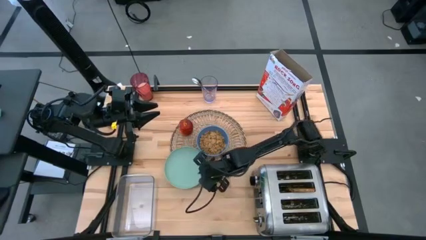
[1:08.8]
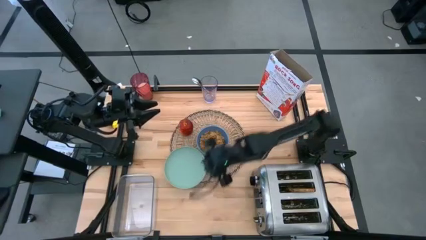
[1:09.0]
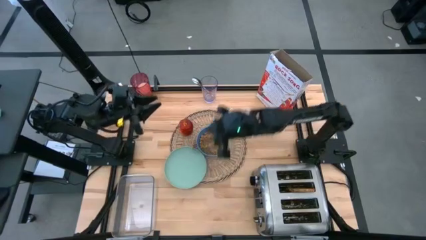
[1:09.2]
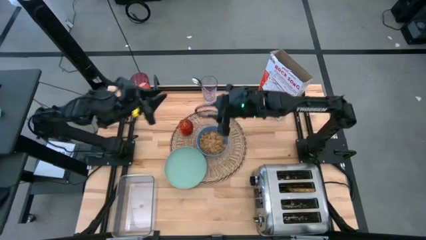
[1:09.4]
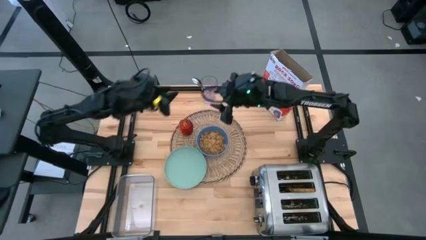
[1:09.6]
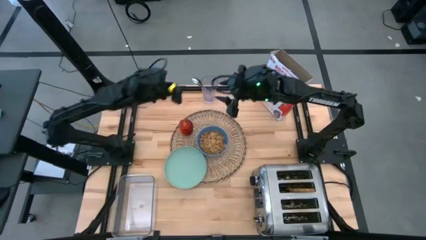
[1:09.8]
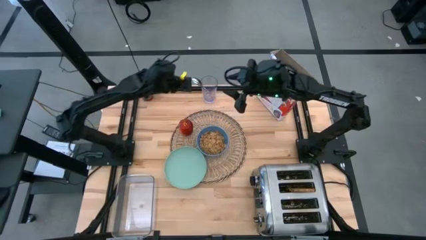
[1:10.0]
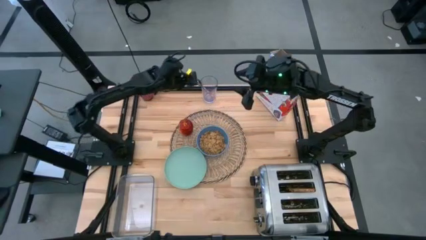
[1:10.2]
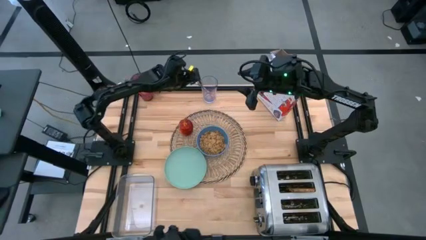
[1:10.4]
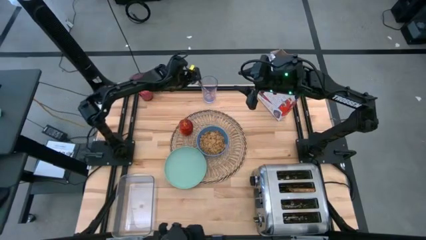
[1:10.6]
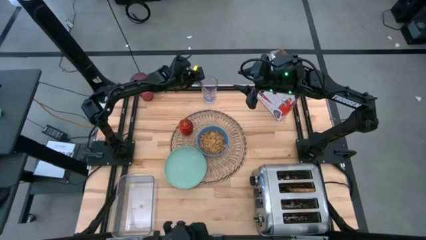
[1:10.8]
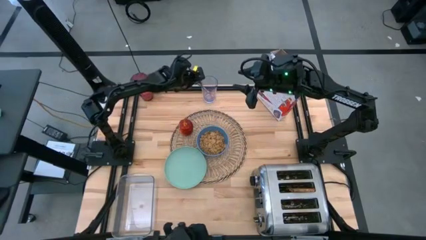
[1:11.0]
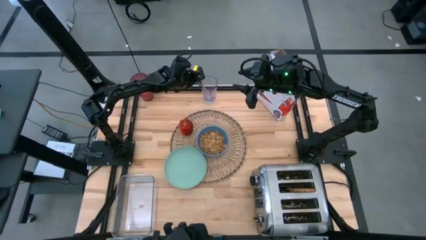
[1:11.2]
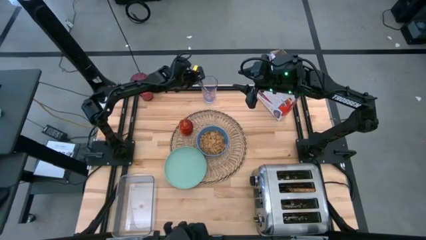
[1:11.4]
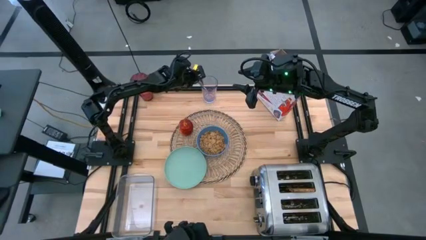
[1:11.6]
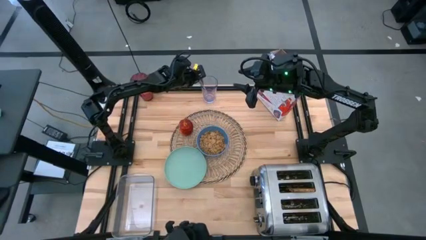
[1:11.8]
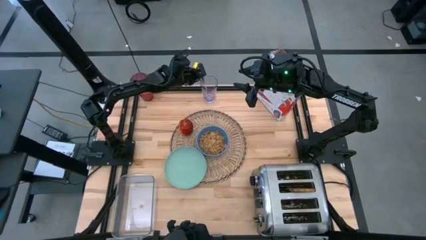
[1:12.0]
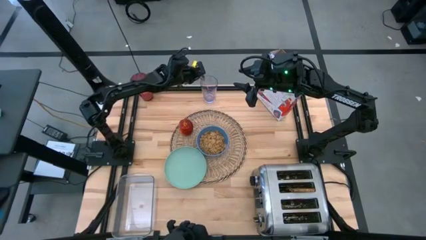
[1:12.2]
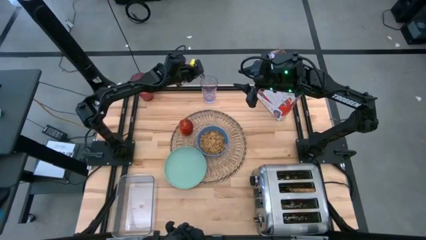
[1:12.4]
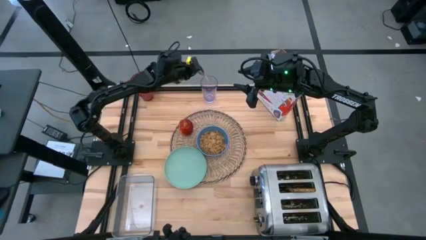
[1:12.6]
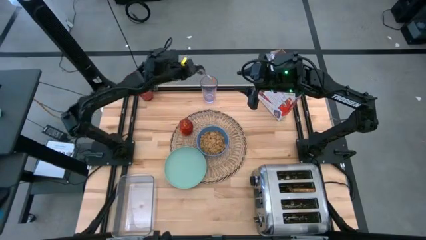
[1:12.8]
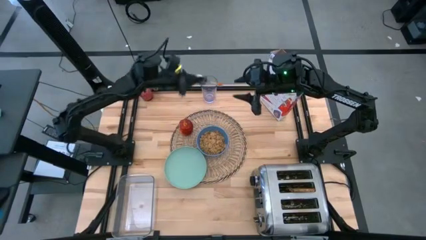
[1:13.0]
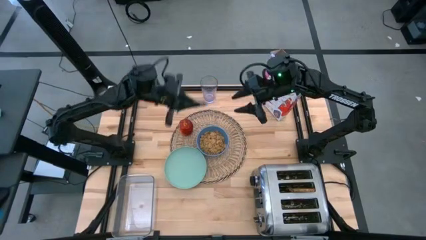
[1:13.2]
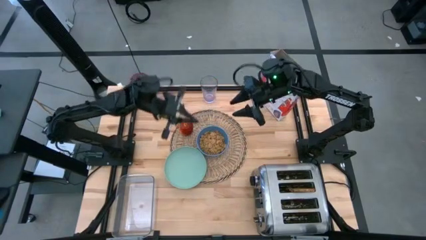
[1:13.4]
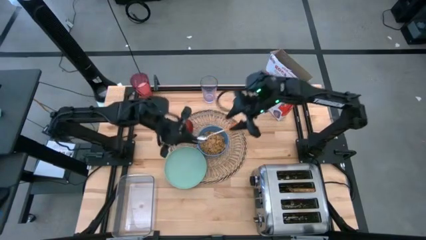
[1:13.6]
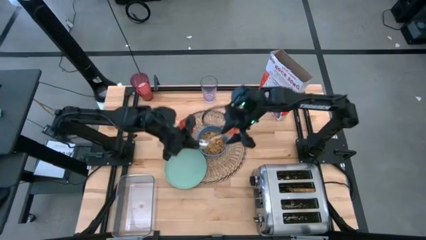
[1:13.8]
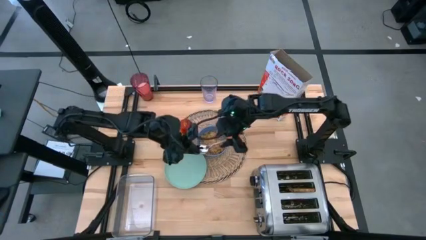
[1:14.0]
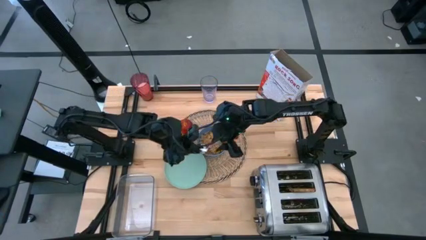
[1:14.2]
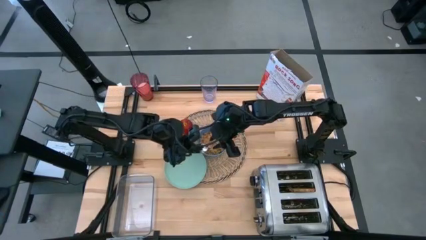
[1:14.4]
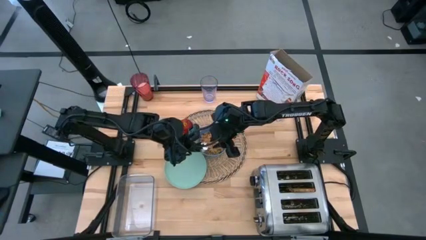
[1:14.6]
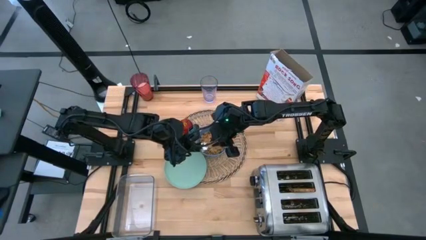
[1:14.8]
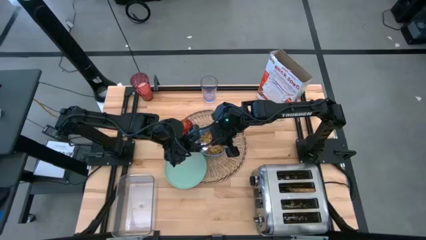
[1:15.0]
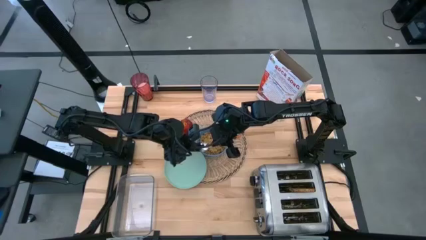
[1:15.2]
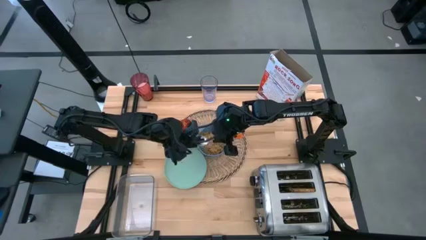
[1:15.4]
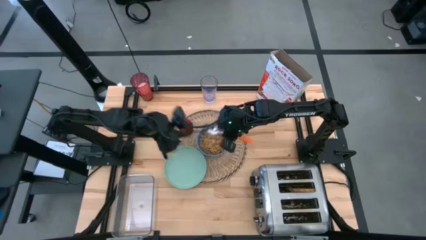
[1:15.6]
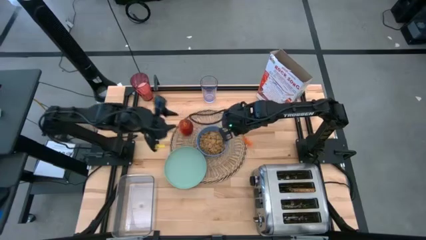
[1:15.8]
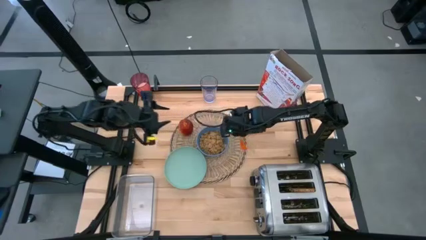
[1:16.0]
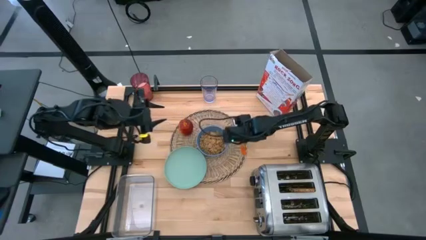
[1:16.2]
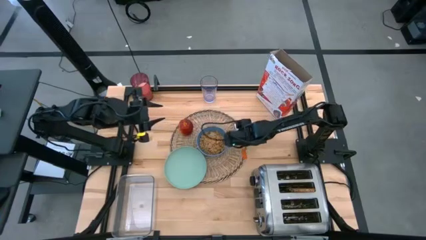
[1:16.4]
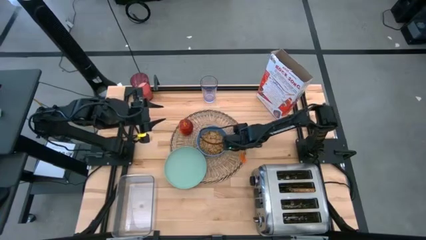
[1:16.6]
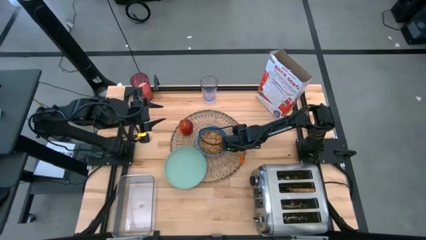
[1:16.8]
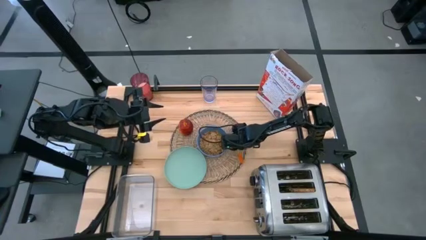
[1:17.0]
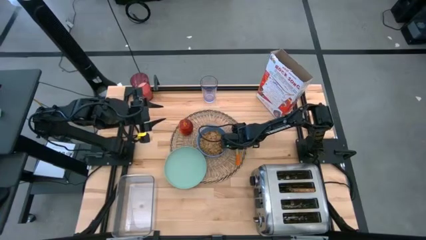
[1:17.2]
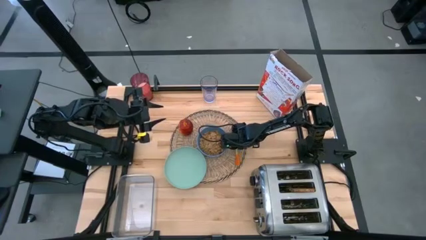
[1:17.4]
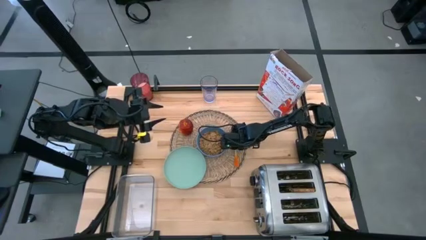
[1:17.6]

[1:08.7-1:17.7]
Task: Arrange a breakfast setting
Put the orange spoon on the brown table mat

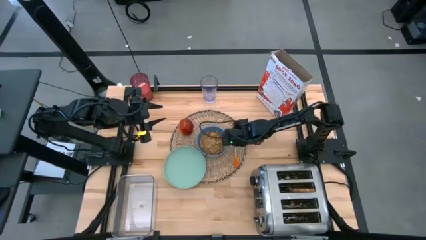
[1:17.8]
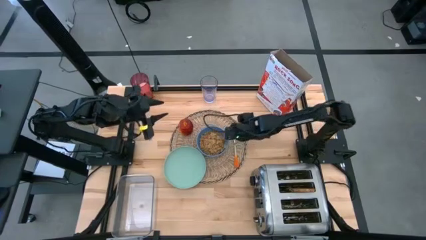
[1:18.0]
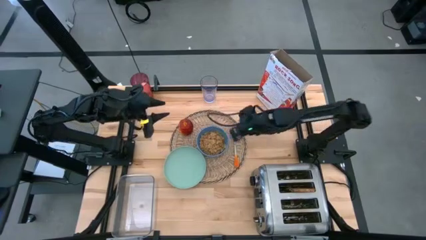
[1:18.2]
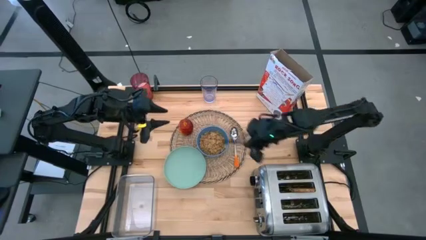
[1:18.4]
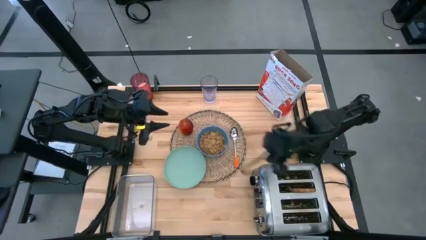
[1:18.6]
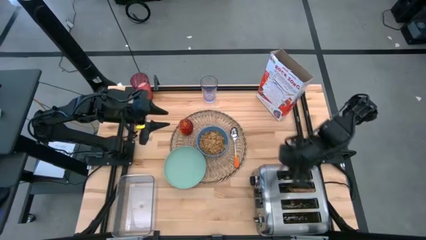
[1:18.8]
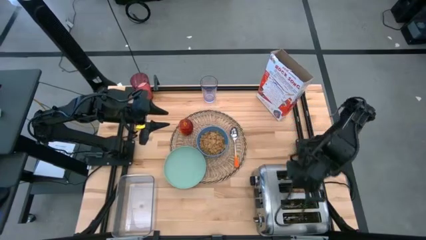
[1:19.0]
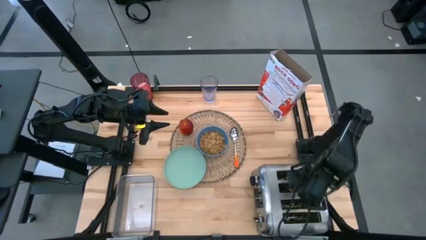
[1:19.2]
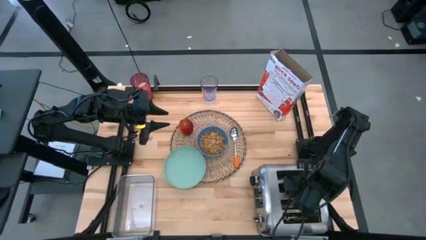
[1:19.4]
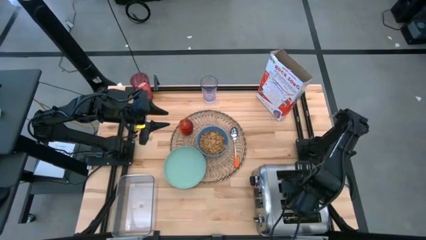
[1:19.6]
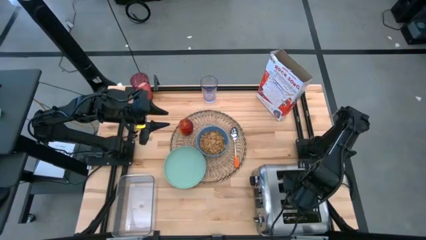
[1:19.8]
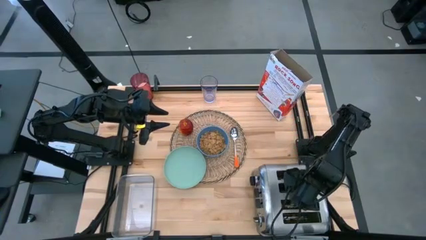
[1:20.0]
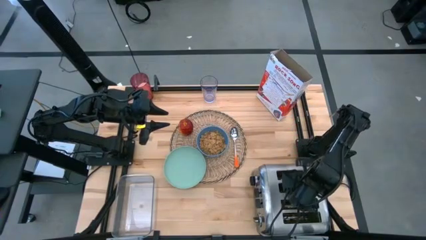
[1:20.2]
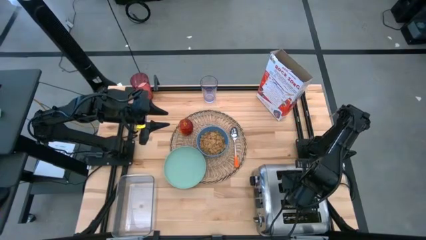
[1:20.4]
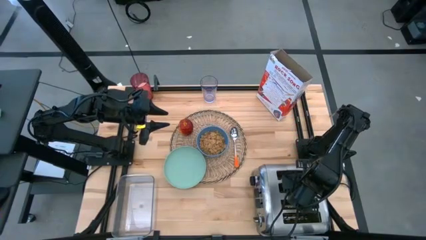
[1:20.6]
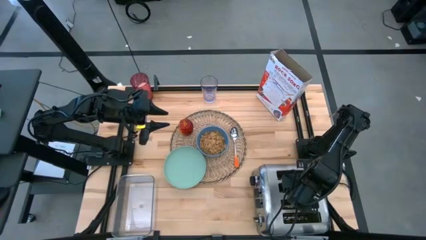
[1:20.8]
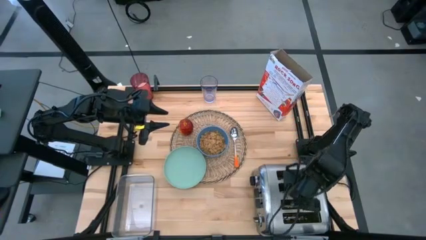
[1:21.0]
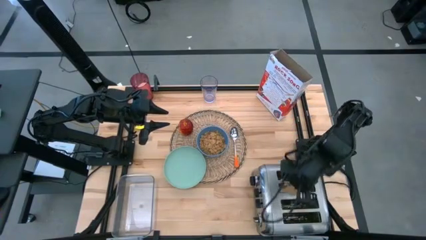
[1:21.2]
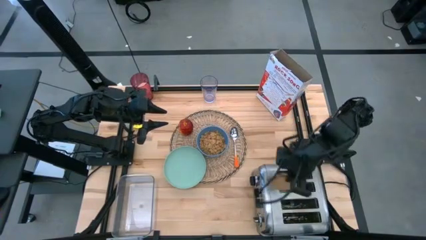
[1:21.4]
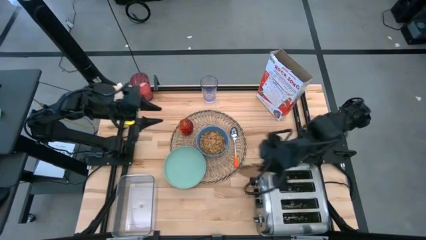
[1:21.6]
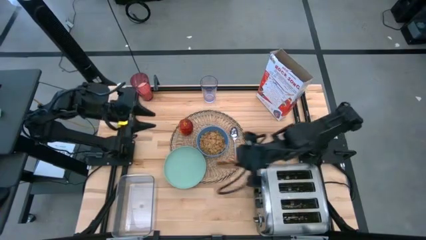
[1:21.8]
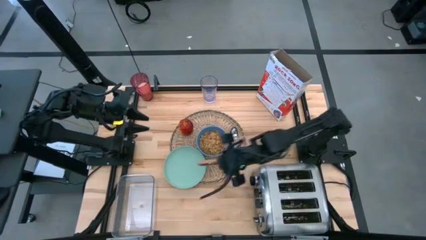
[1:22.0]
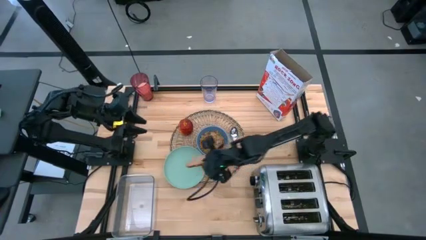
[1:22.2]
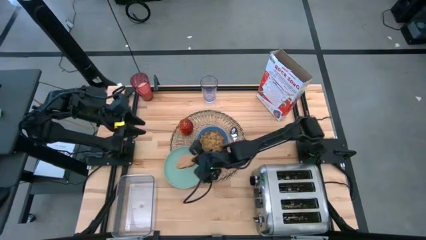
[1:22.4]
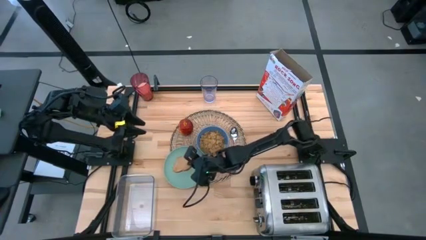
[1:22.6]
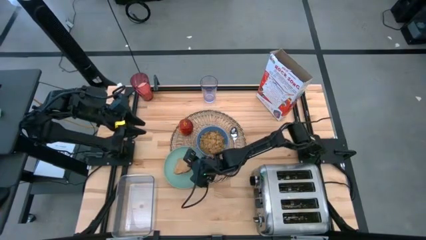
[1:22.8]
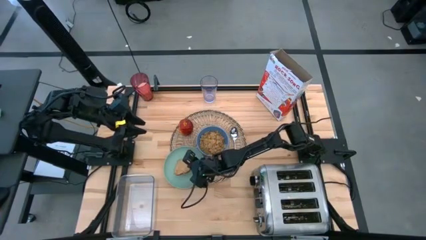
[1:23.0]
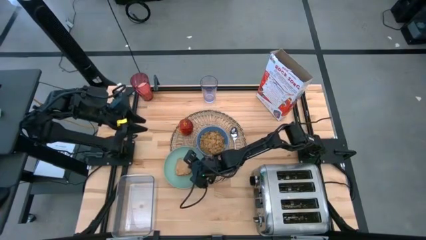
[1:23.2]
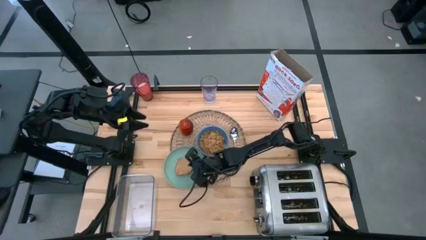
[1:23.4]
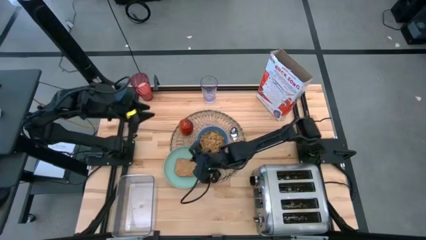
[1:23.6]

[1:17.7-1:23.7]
Put the brown toasted bread on the green plate

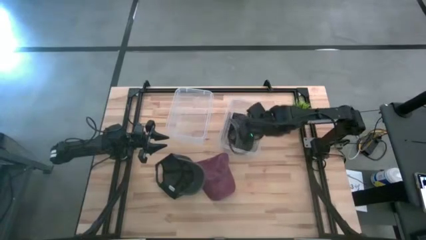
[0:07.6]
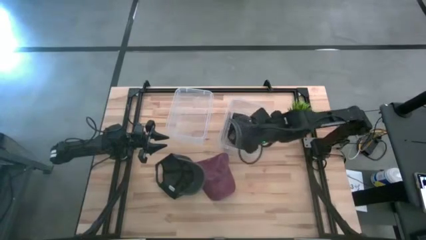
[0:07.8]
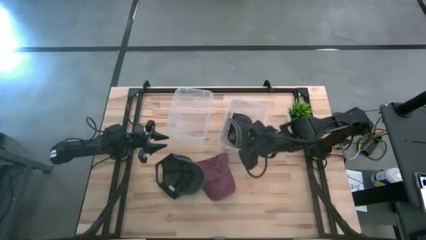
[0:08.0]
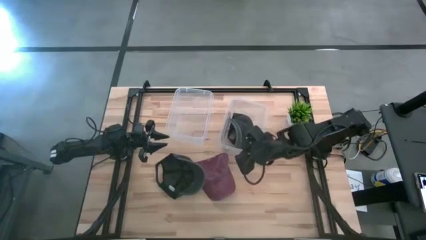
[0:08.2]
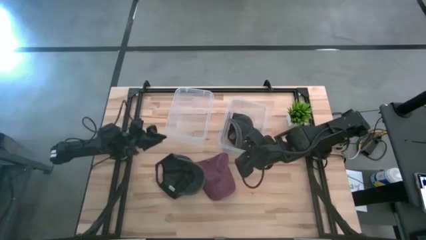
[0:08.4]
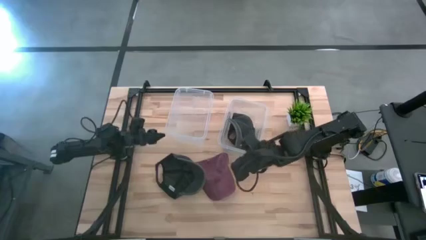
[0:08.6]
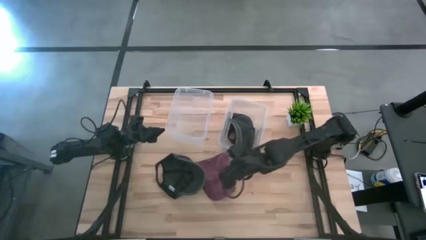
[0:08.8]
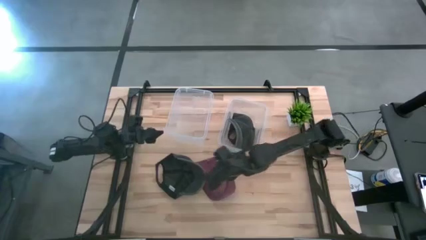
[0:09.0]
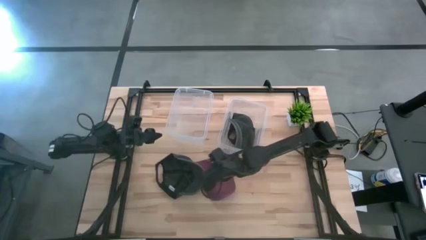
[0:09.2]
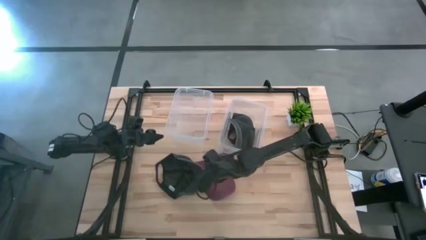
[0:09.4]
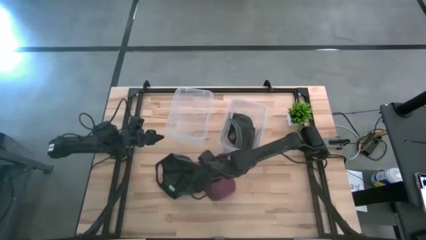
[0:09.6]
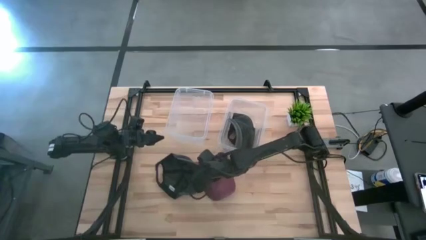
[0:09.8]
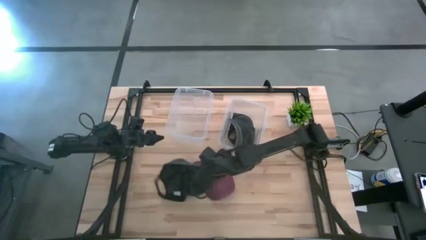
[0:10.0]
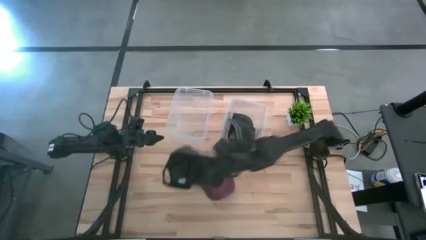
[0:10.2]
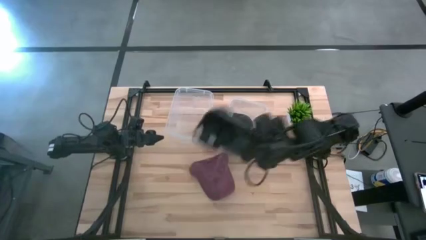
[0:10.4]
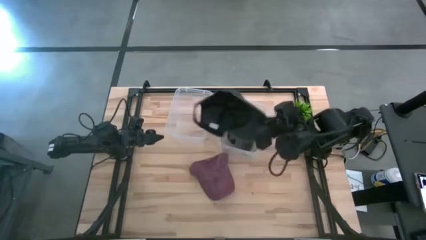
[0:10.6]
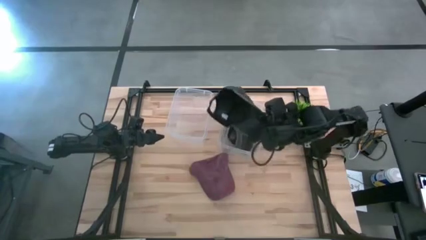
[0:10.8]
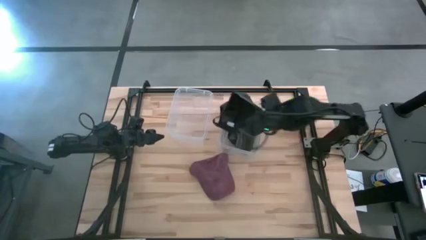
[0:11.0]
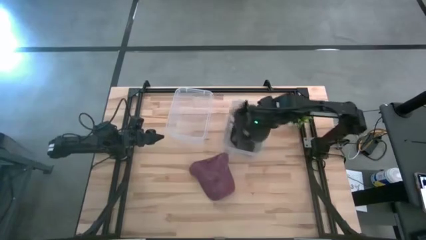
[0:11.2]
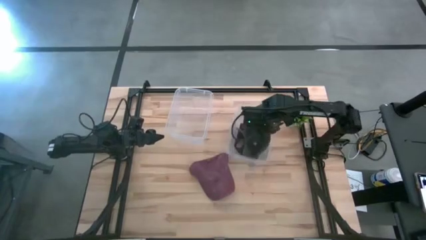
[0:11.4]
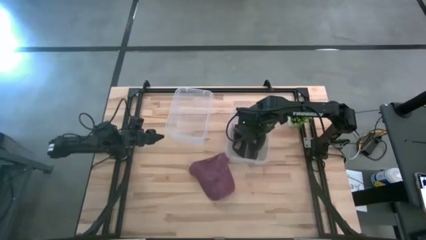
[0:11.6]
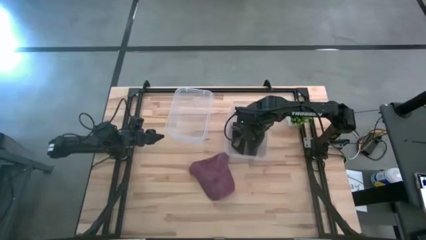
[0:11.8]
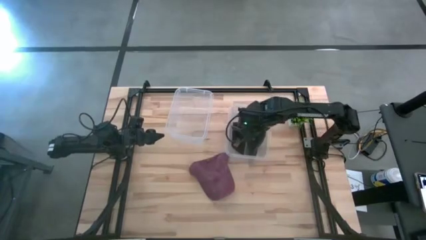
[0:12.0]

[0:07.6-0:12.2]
Task: Pick and place caps into container
Put the black cap into the right transparent container
